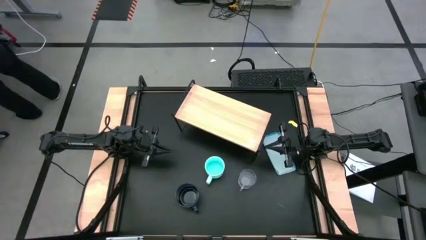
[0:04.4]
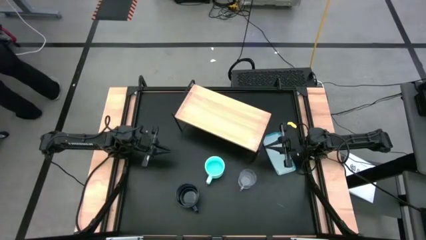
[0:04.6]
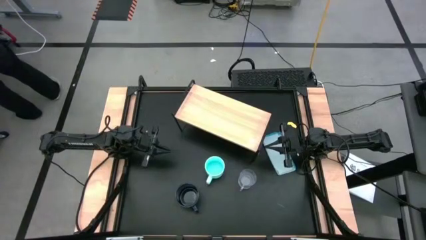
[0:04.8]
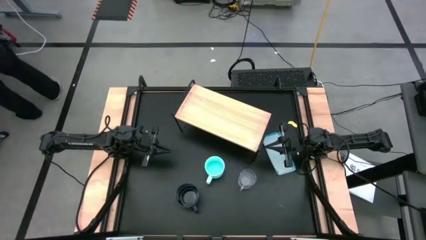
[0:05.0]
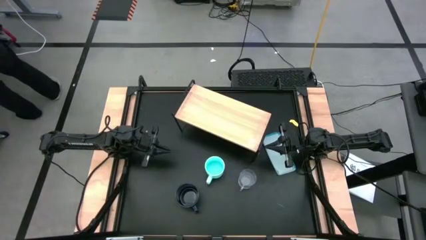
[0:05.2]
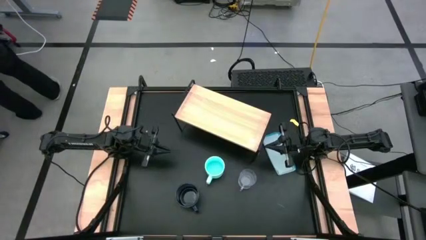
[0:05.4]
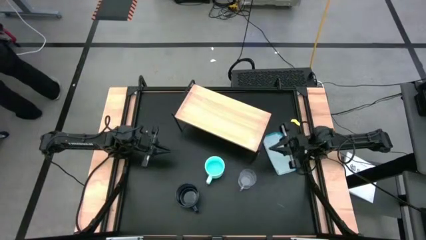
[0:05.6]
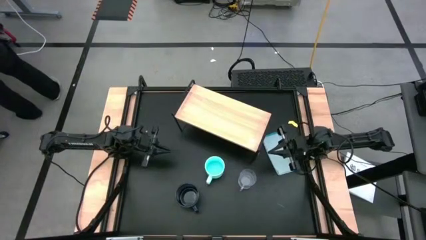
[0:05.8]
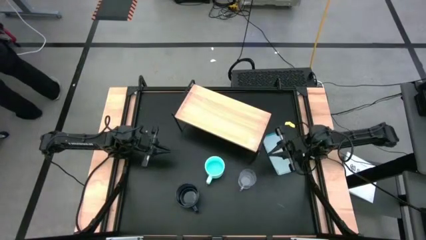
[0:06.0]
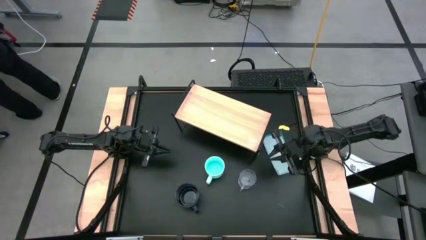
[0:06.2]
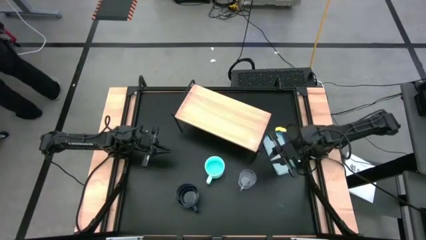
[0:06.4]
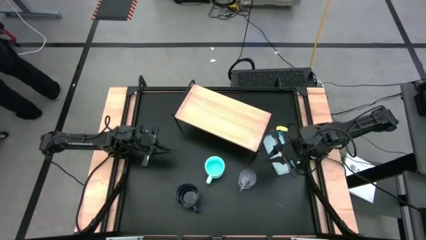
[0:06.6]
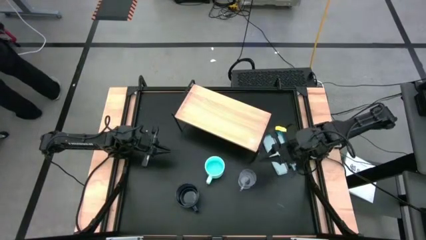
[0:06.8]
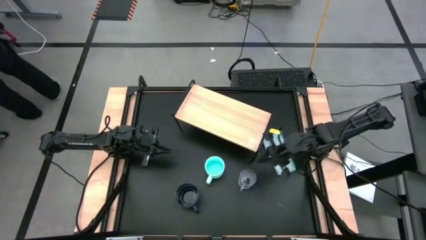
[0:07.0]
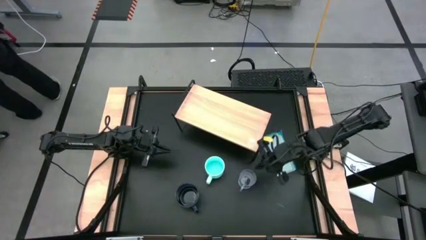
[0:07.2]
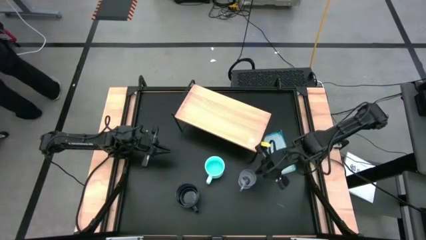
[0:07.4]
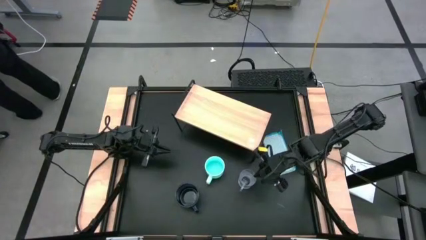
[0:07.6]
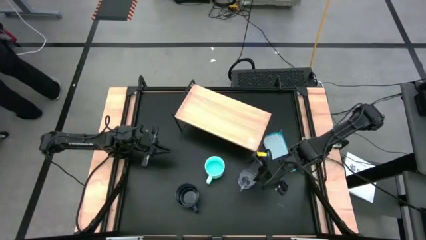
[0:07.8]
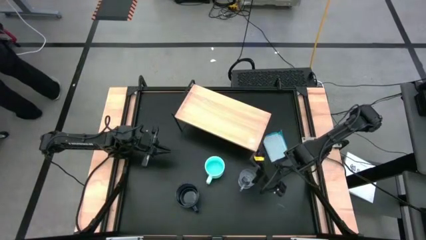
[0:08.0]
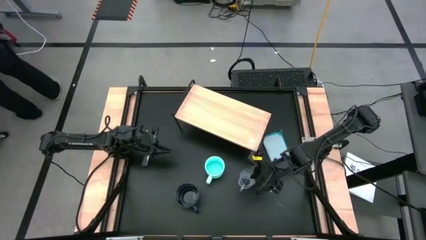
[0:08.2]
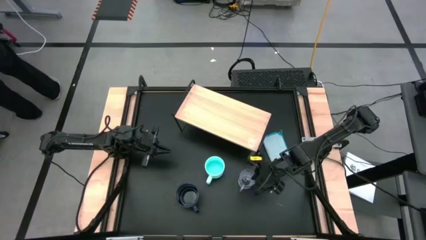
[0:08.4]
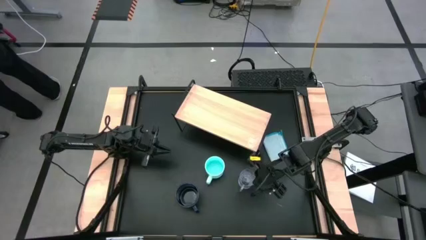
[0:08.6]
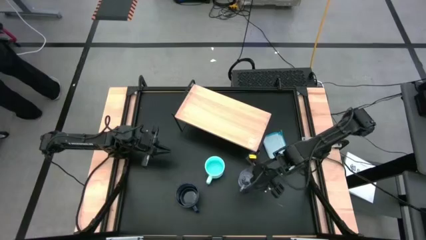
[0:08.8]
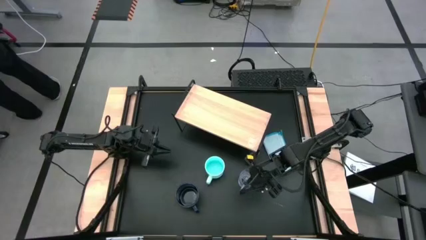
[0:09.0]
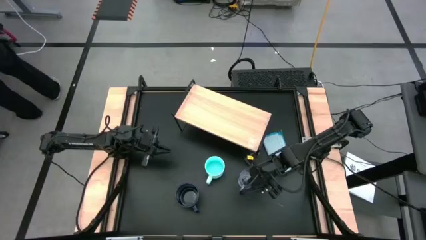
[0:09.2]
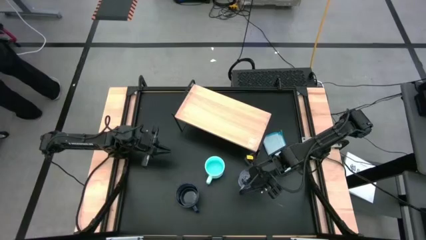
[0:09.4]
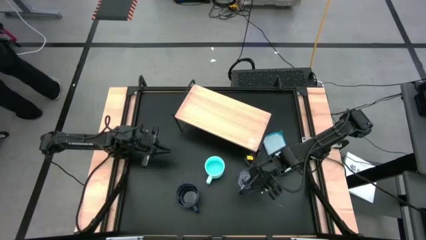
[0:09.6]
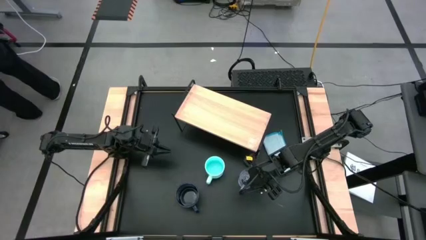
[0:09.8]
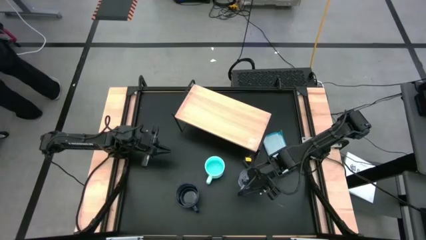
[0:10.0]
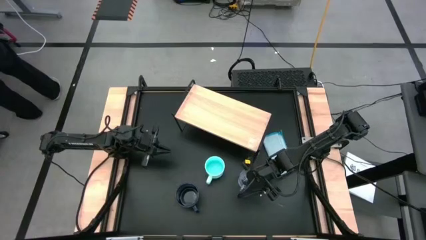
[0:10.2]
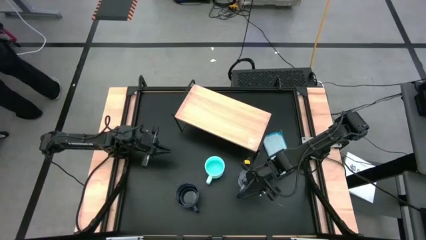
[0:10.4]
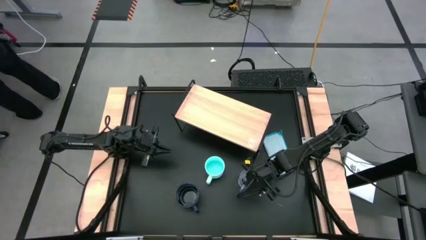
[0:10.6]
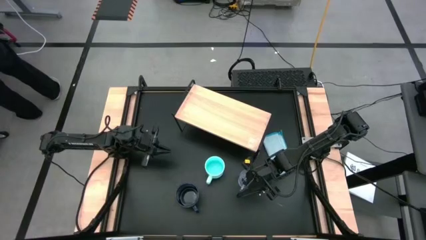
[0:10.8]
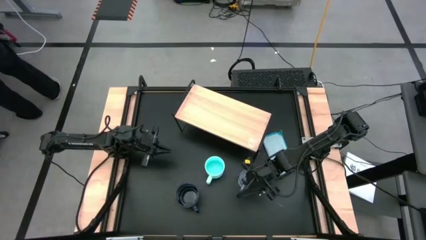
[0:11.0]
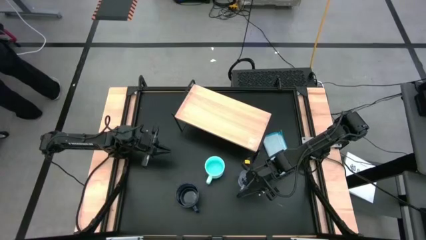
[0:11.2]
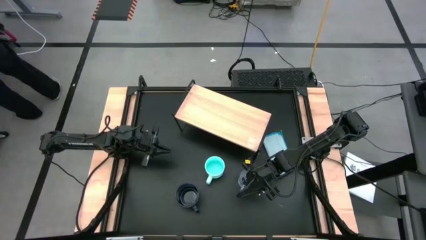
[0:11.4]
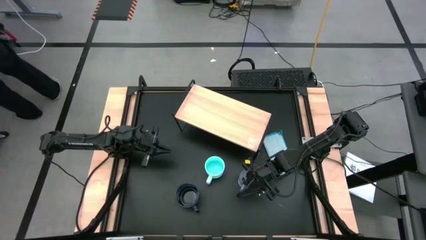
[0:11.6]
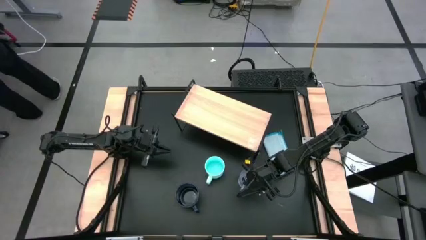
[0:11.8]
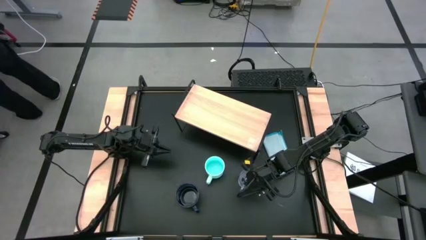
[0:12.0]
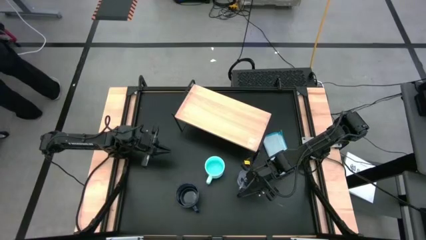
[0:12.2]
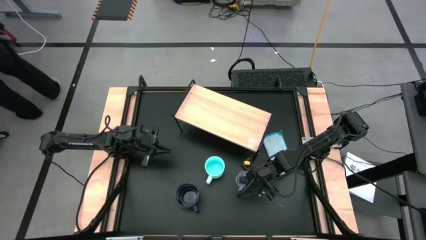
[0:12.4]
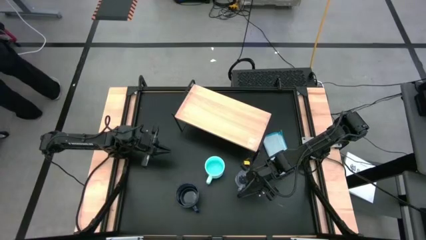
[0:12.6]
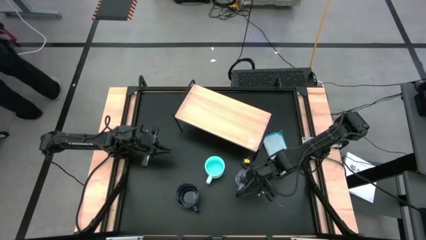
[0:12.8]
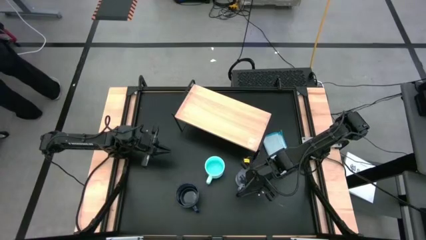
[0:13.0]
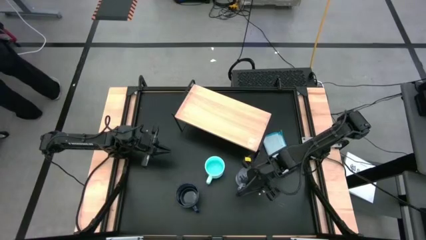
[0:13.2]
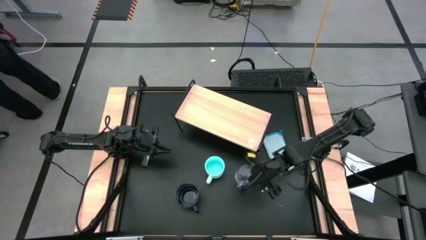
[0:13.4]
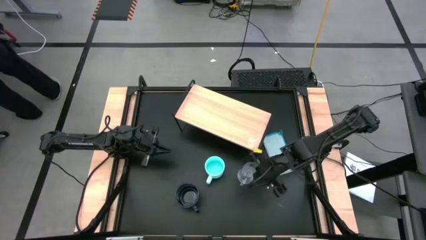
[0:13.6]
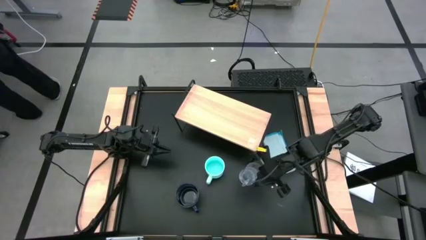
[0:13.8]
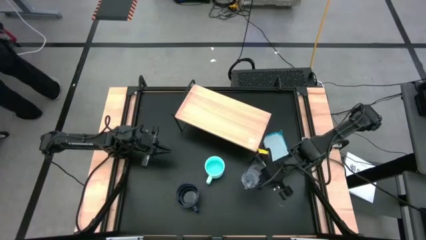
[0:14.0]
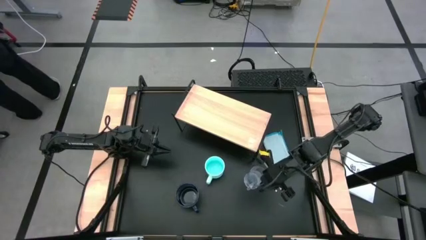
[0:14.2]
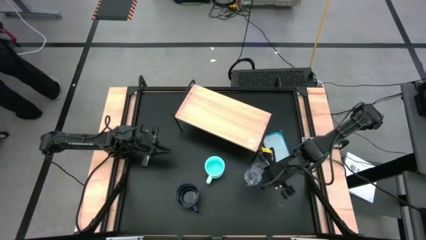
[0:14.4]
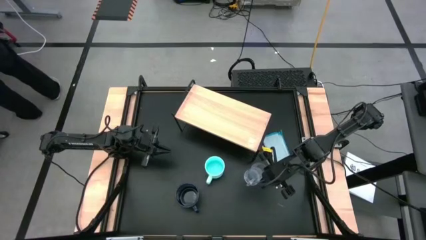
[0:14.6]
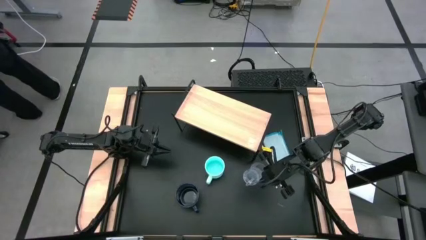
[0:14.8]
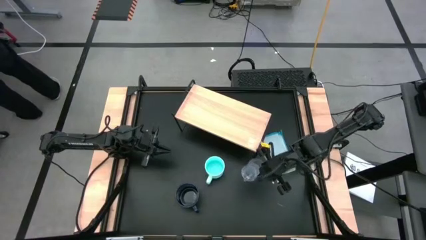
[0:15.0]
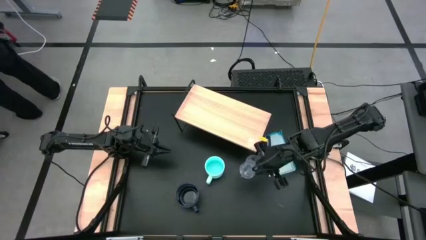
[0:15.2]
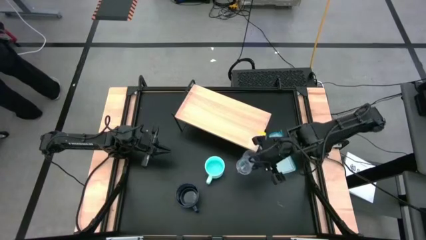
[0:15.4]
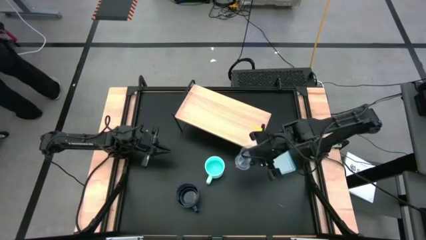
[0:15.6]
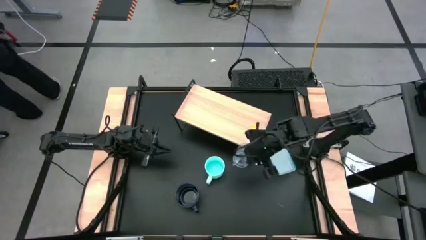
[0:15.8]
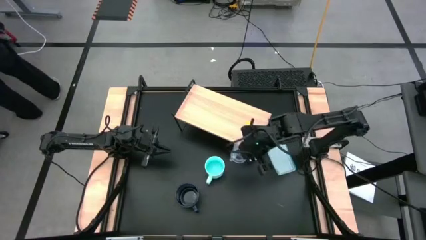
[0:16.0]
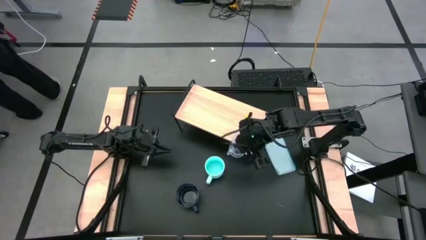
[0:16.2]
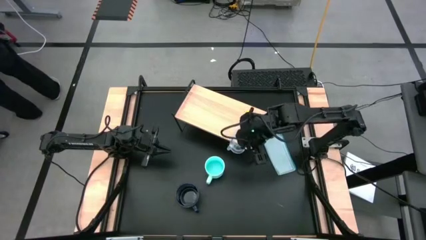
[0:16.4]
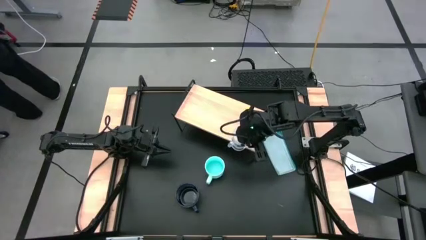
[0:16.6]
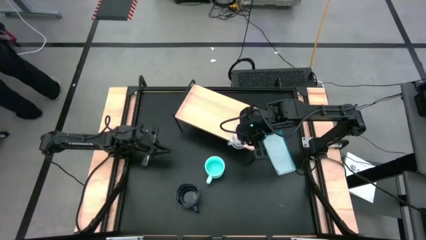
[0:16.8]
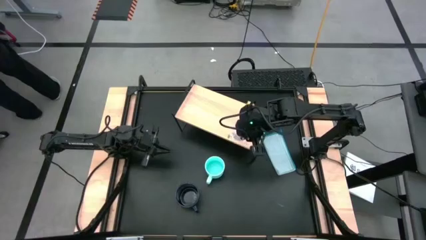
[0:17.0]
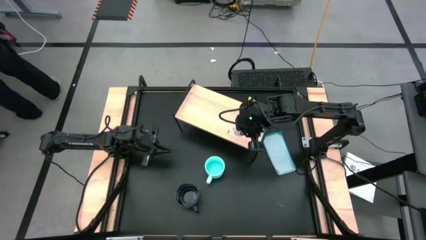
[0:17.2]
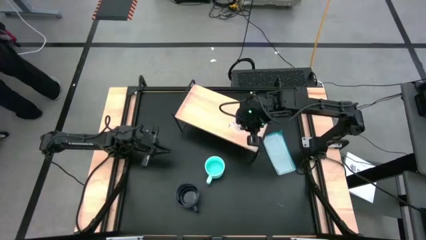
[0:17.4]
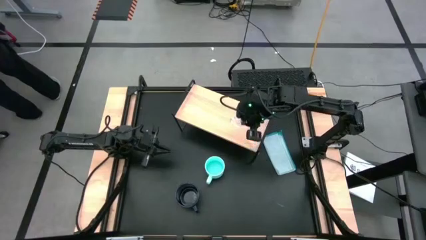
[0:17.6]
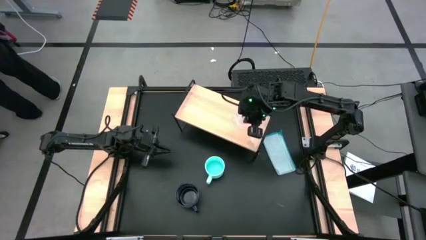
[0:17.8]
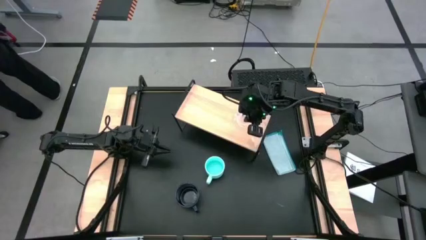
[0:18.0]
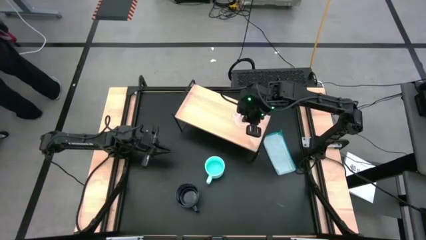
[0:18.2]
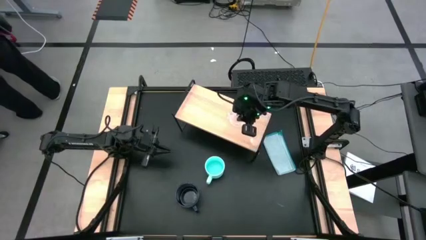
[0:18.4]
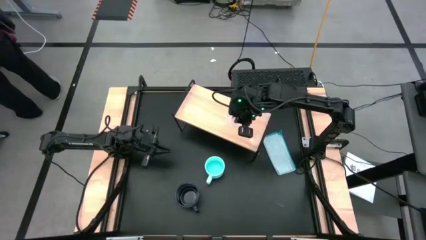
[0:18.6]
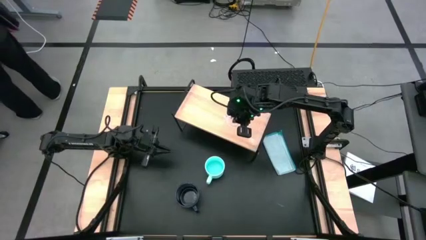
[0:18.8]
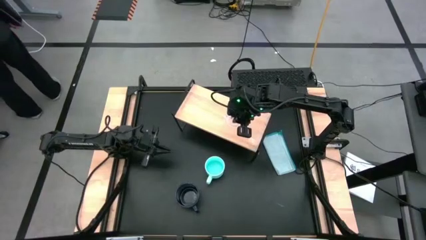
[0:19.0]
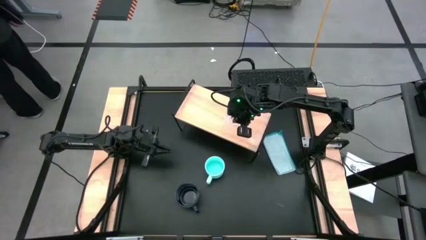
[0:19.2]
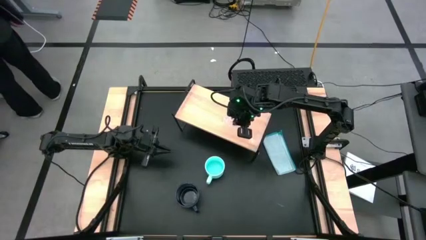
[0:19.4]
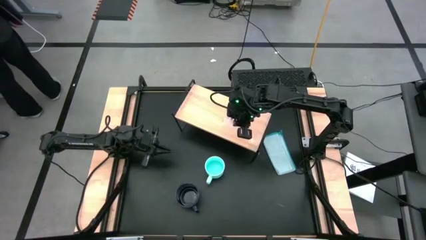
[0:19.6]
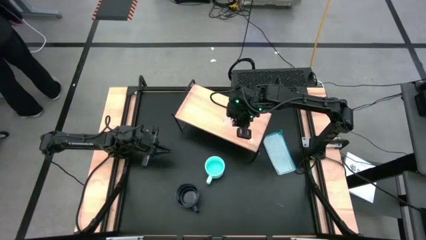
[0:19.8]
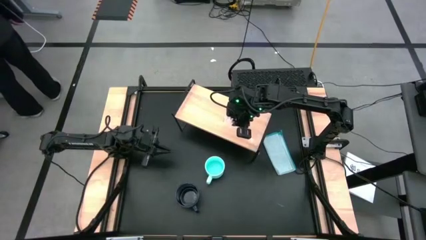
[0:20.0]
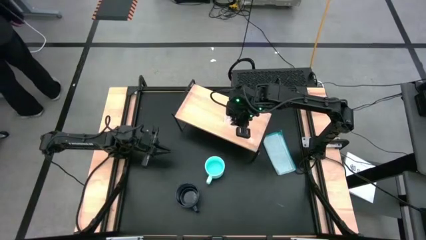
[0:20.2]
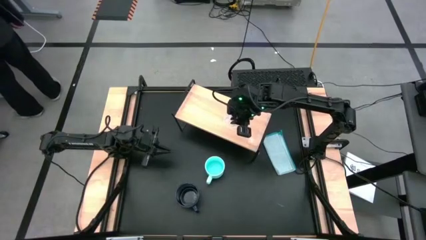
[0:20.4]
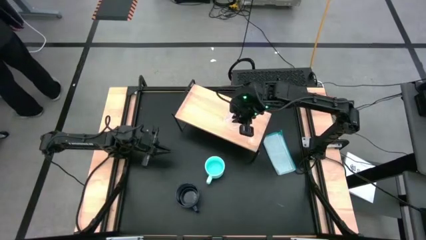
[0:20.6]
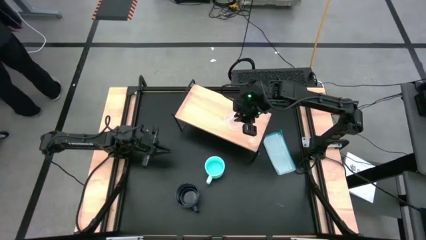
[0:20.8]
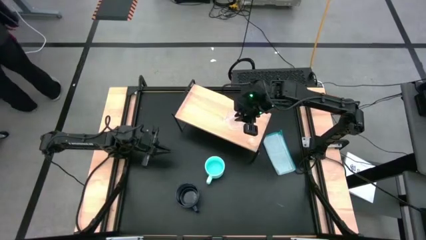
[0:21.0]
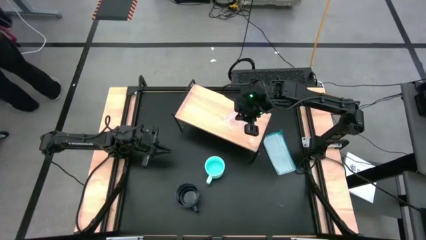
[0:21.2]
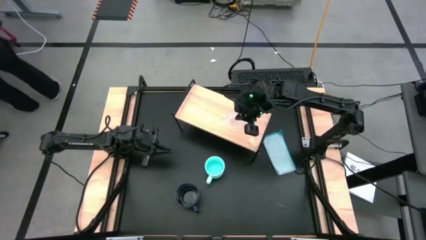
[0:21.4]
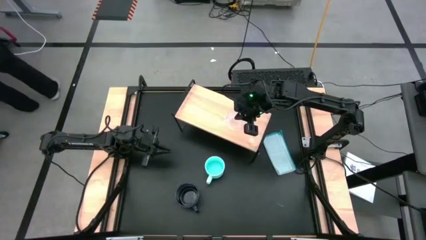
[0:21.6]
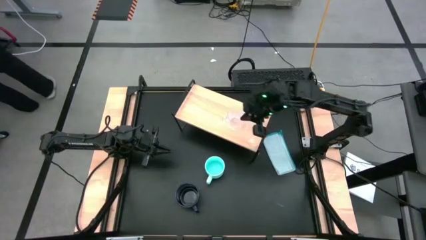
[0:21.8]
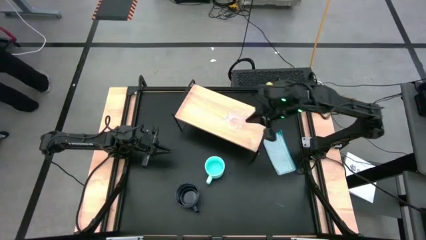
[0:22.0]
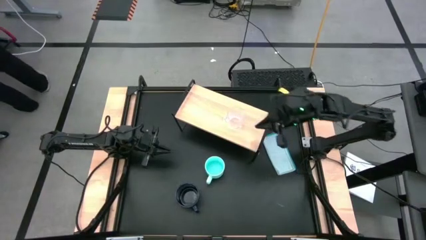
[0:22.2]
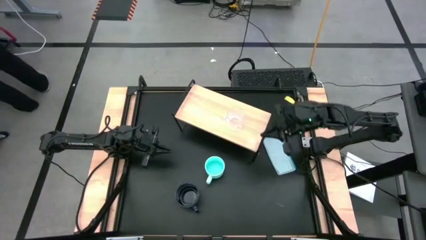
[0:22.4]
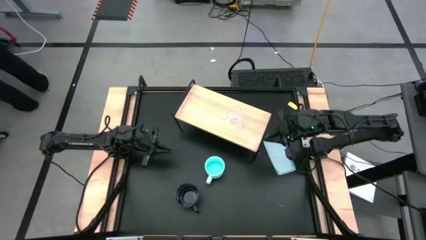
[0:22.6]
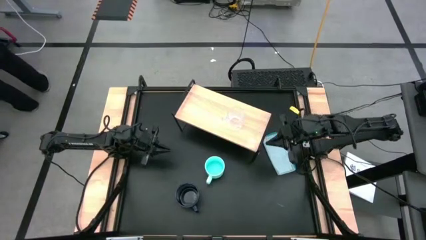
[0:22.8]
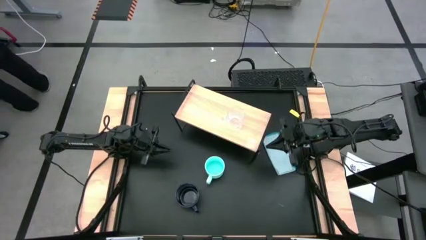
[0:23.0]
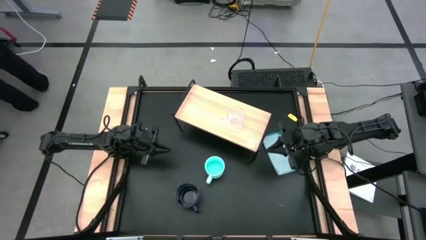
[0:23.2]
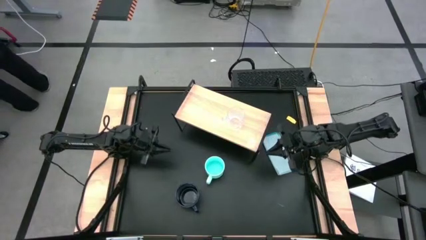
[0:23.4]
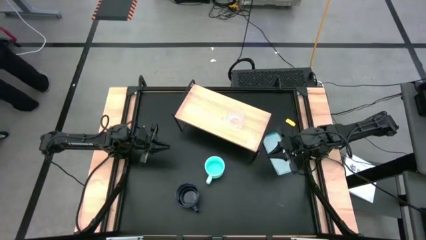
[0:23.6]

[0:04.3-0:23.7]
Task: Stack small to large cups/mugs on shelf
Put the transparent mug on the shelf
